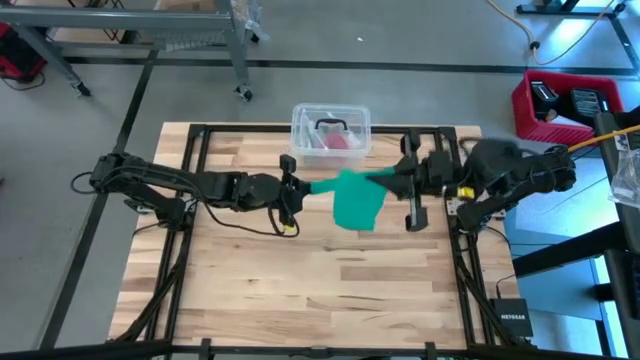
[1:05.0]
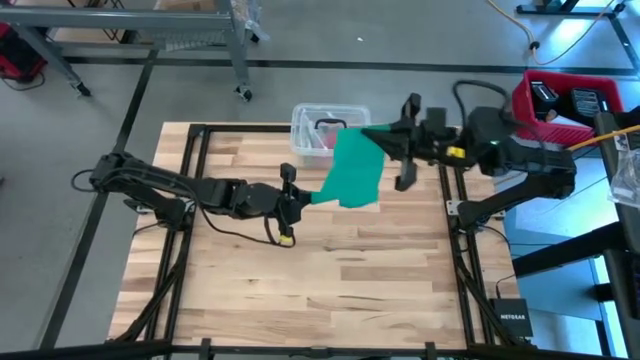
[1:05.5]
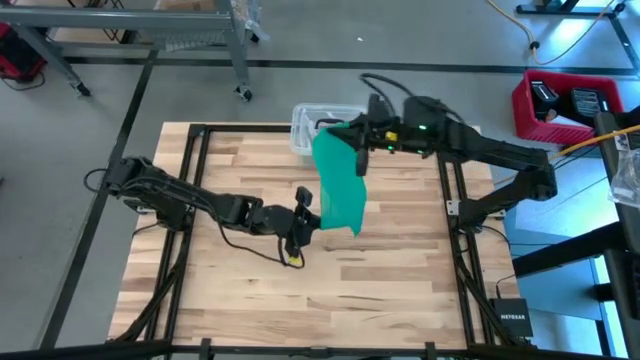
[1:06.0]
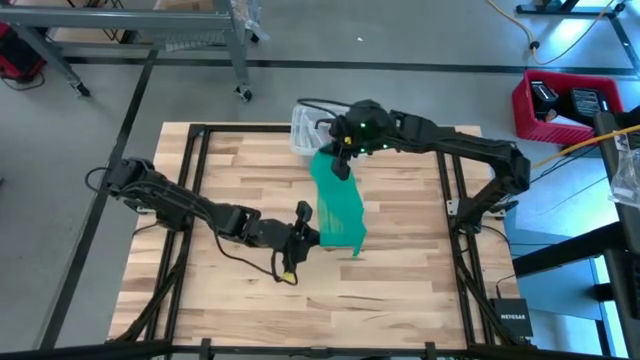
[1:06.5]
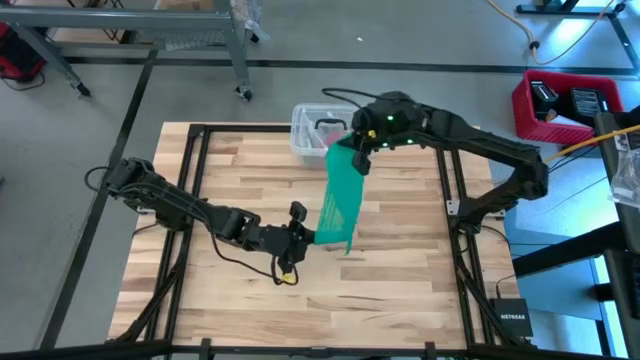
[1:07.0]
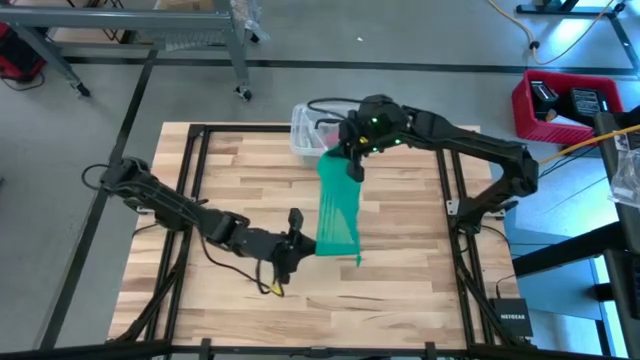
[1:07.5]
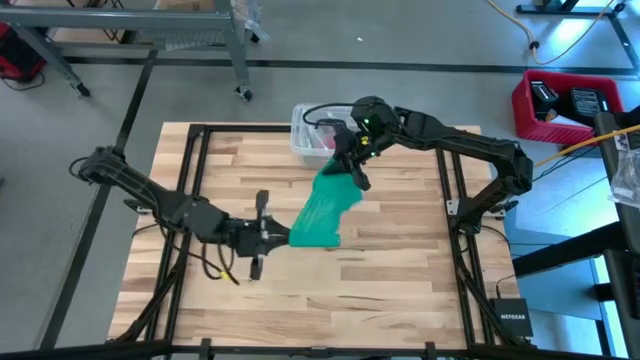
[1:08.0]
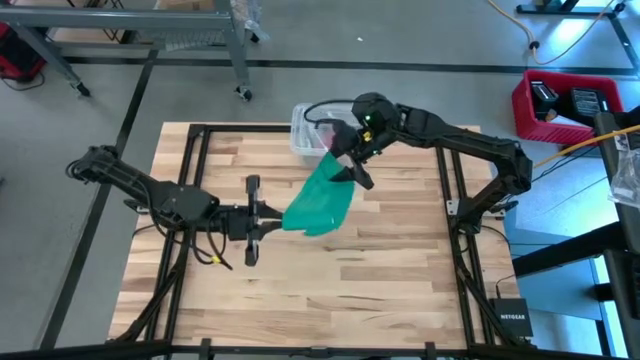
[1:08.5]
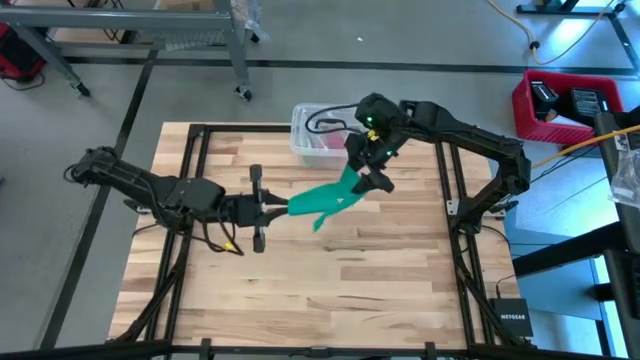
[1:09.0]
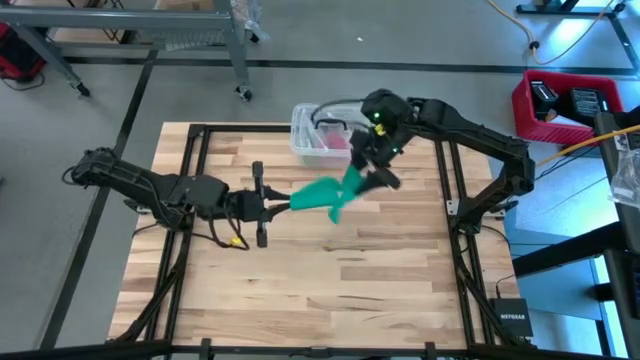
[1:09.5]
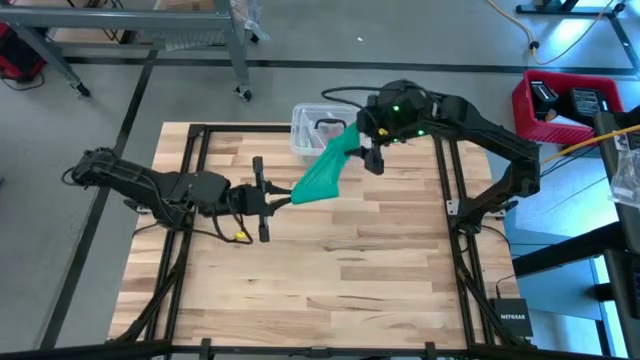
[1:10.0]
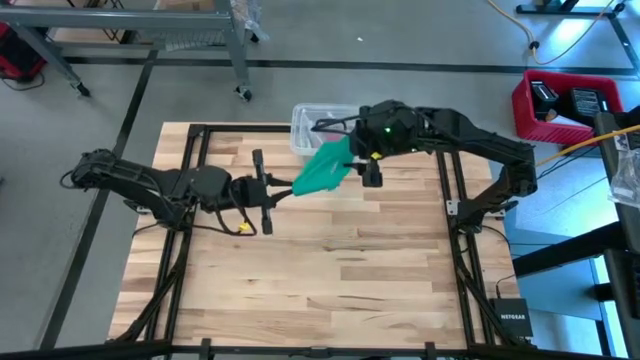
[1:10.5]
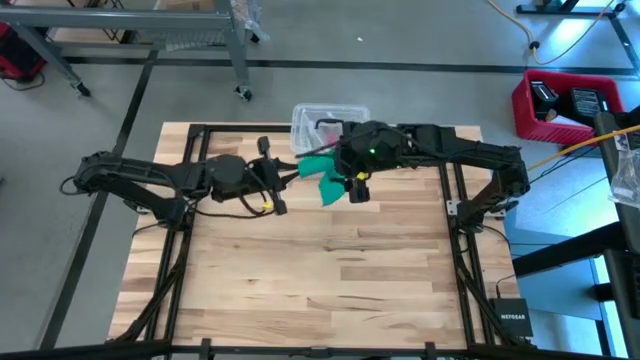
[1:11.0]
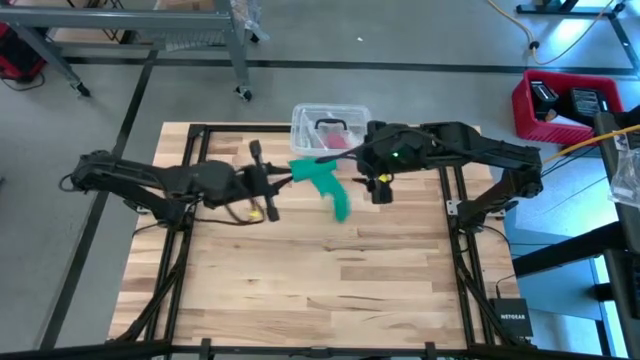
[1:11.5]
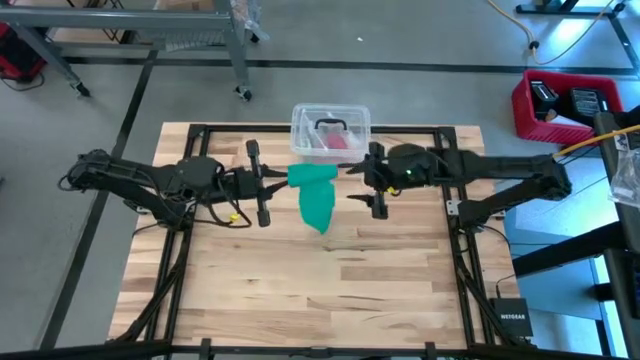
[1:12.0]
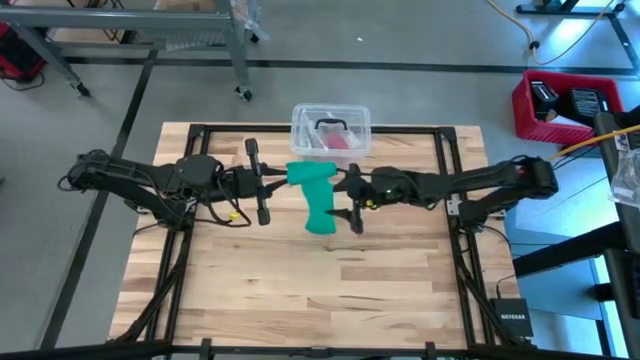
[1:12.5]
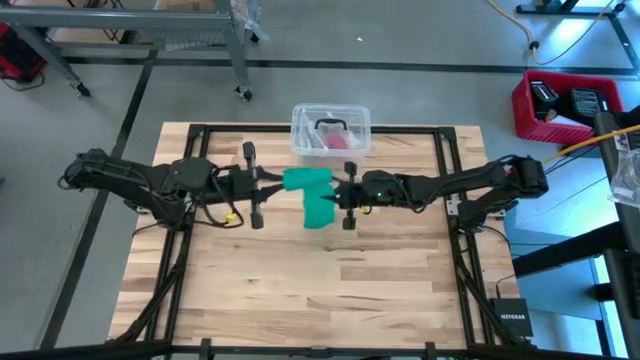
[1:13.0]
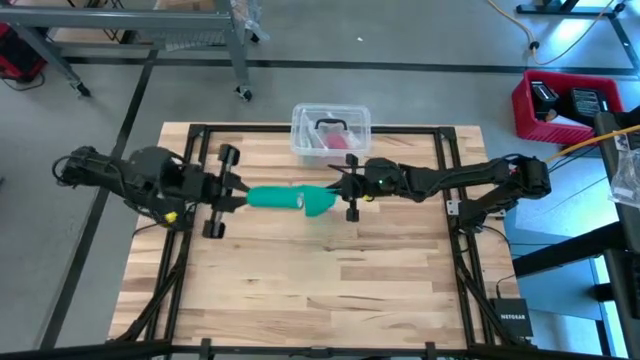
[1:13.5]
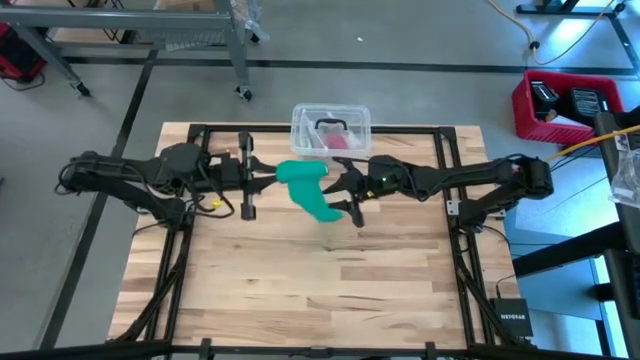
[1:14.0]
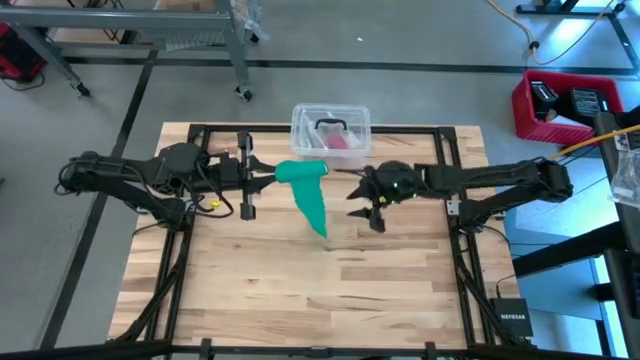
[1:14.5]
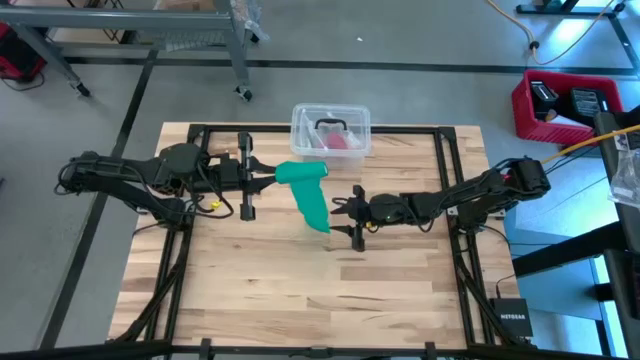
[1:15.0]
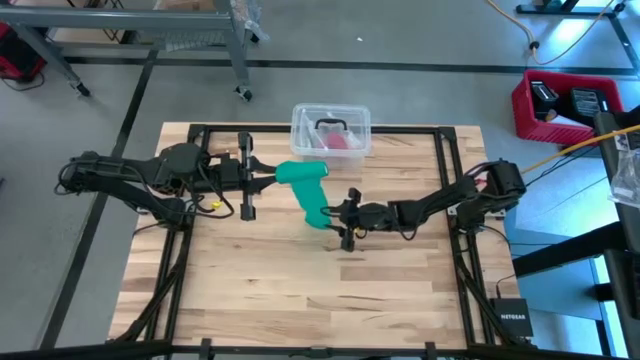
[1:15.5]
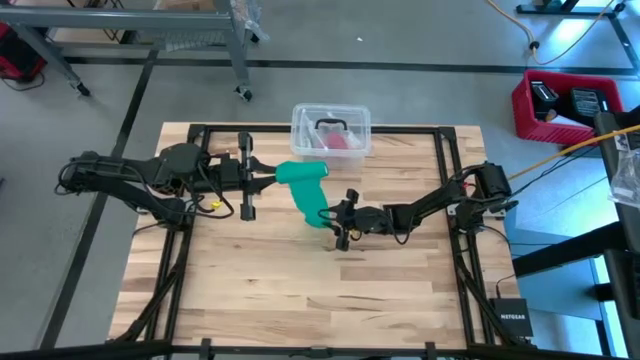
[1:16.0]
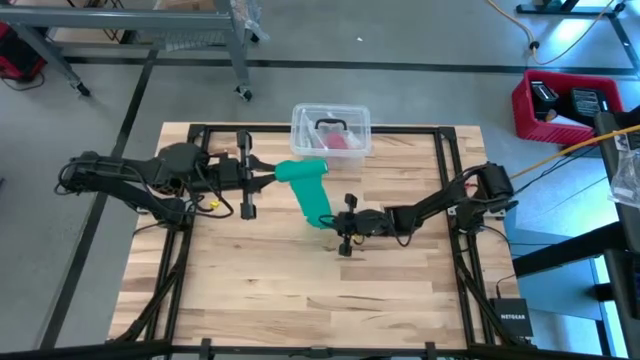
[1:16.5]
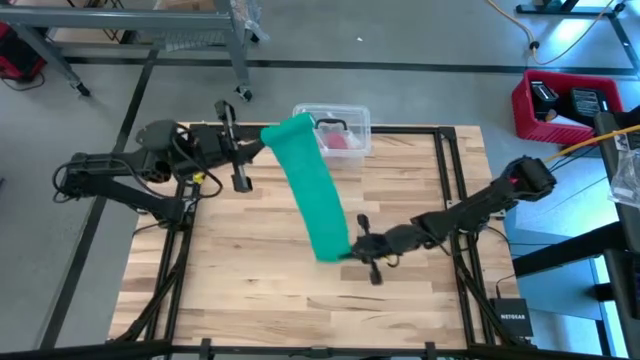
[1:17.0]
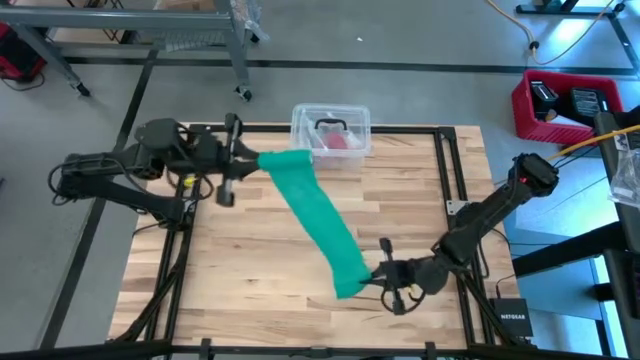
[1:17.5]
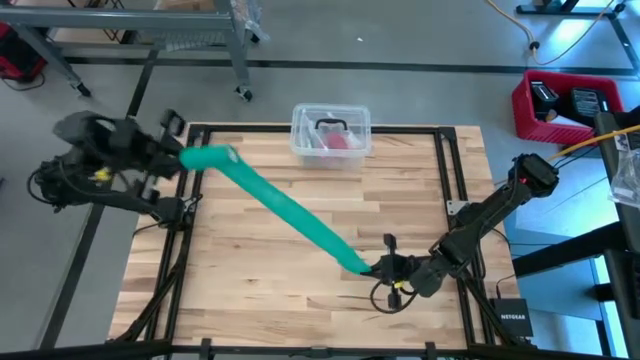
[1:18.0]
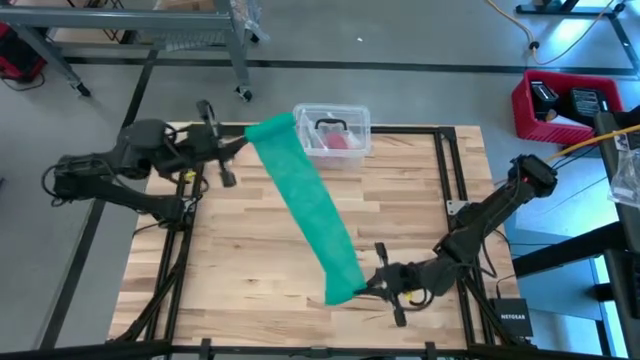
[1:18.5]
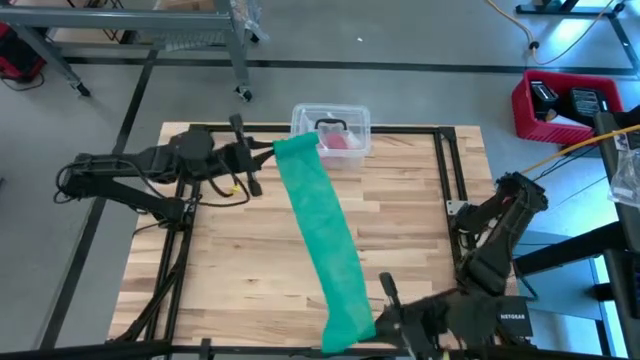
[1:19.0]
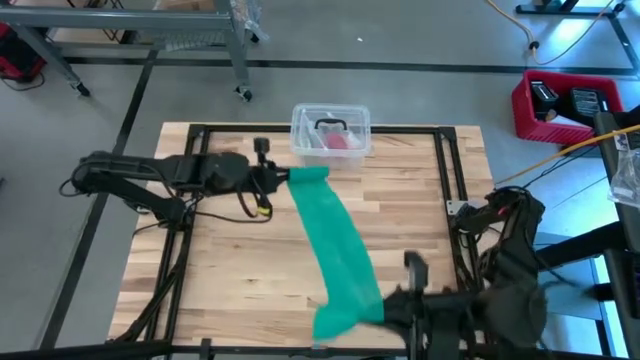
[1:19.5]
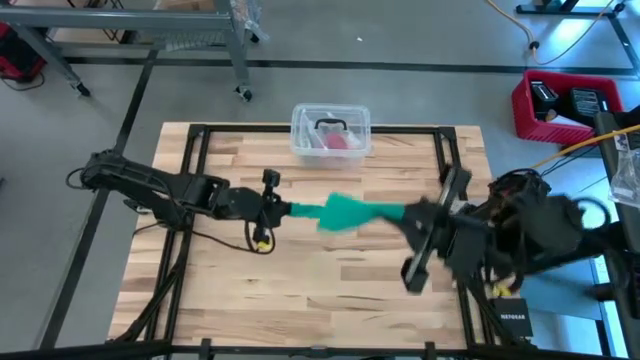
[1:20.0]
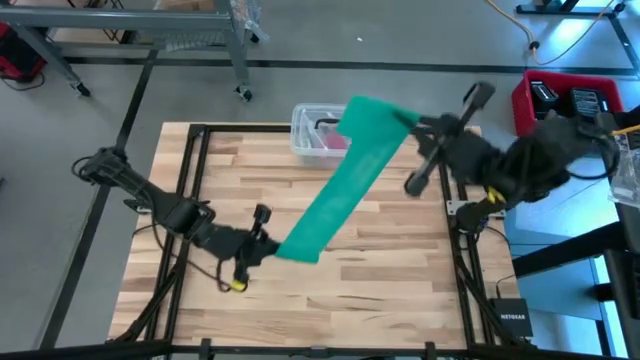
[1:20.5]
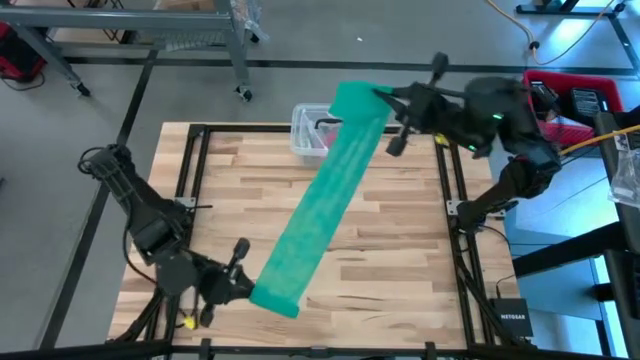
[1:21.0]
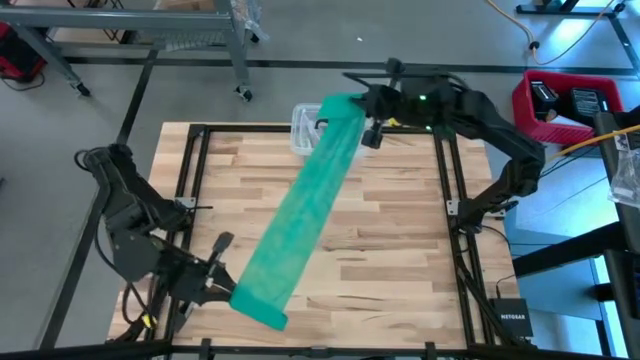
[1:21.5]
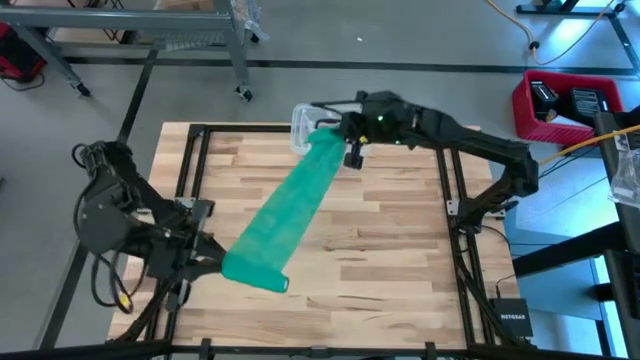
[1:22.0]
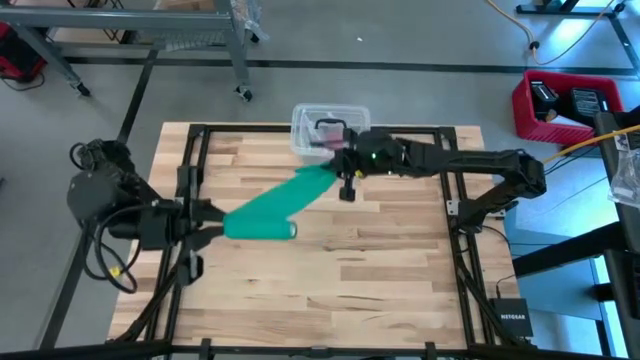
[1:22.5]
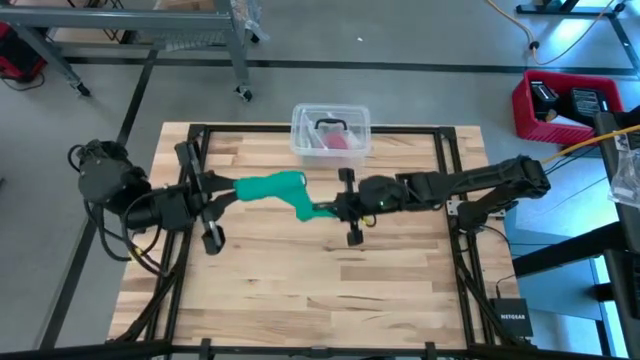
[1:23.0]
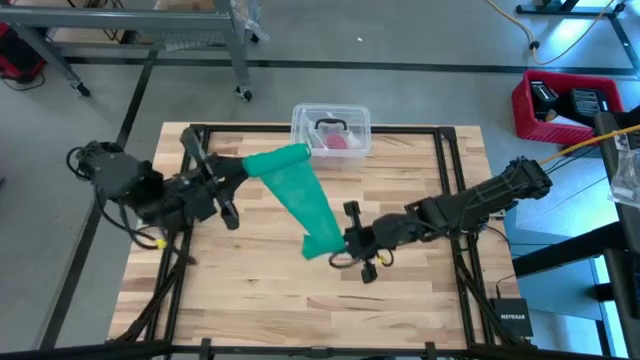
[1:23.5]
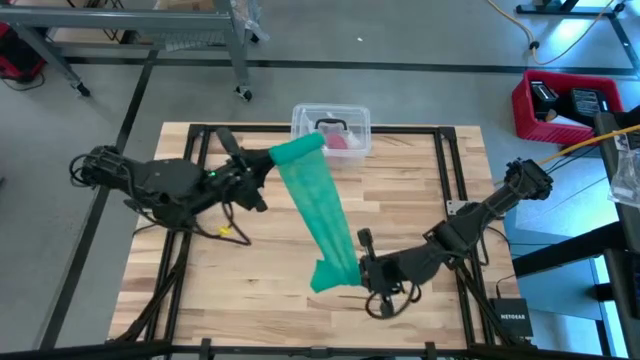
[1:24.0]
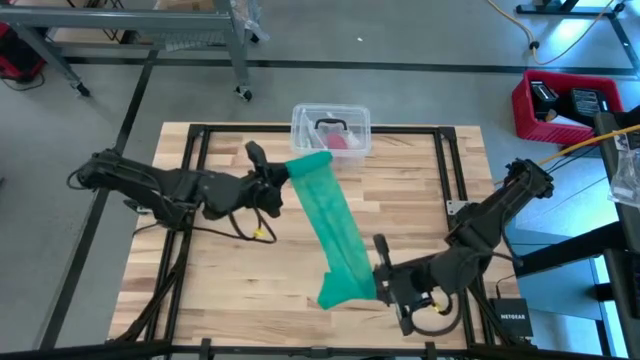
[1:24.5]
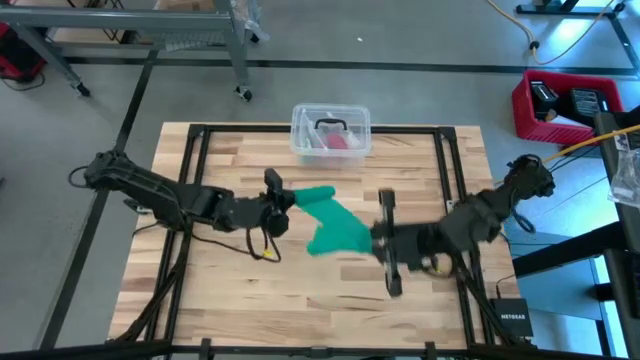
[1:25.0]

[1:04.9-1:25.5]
Task: Roll bandage
Roll the green bandage
